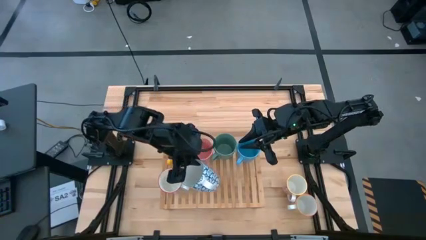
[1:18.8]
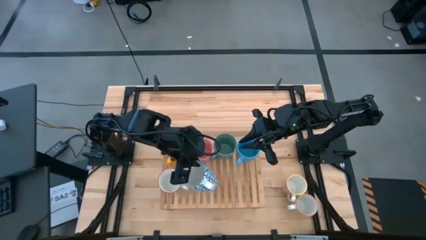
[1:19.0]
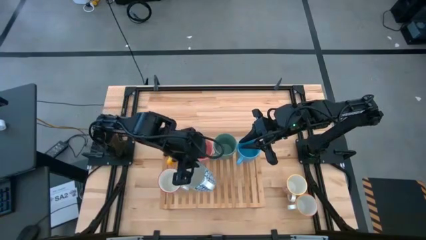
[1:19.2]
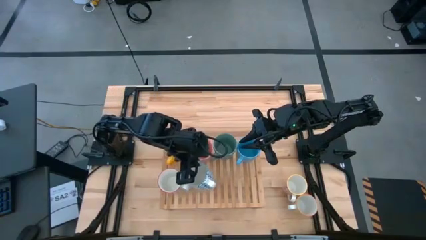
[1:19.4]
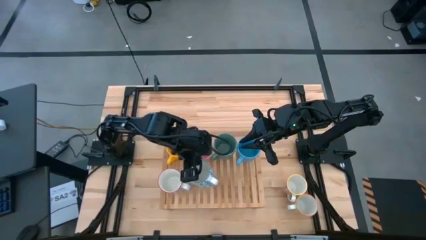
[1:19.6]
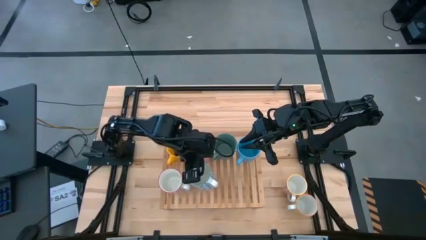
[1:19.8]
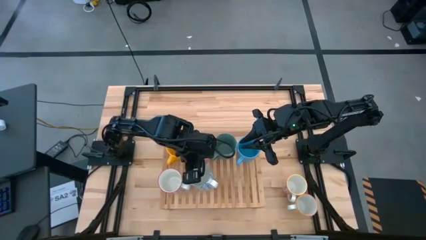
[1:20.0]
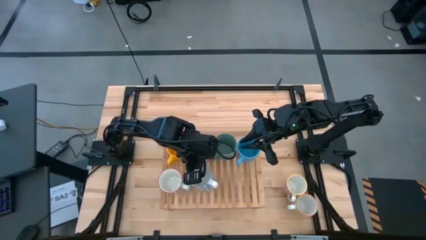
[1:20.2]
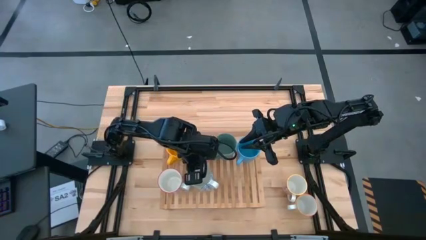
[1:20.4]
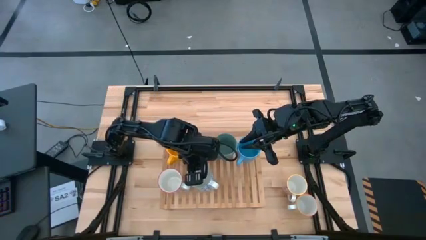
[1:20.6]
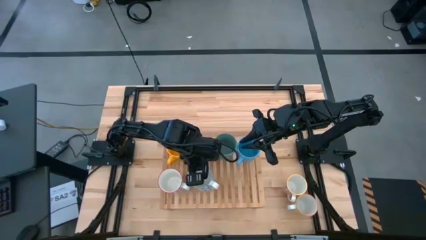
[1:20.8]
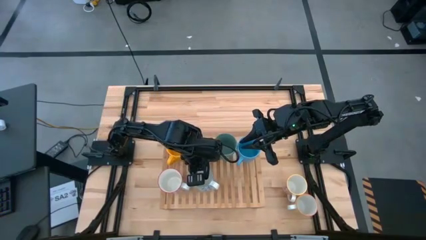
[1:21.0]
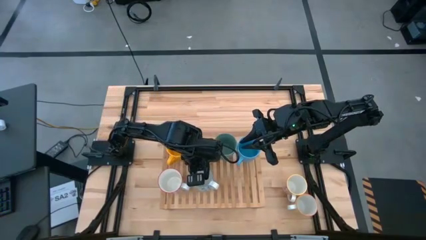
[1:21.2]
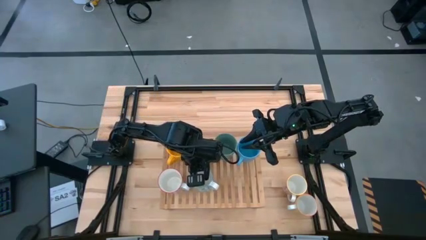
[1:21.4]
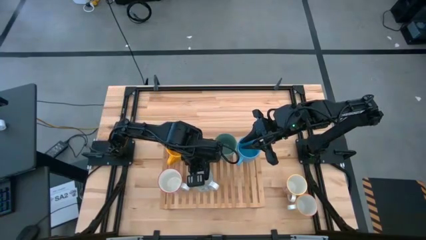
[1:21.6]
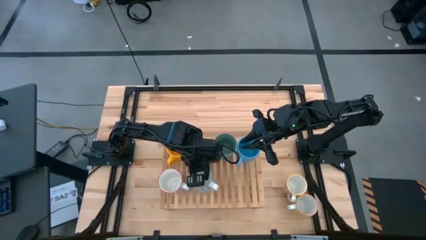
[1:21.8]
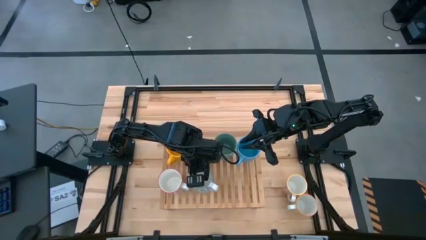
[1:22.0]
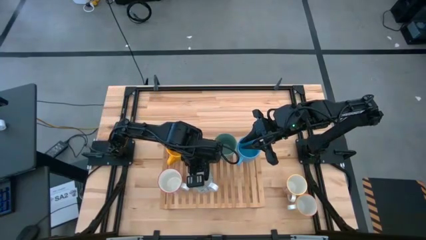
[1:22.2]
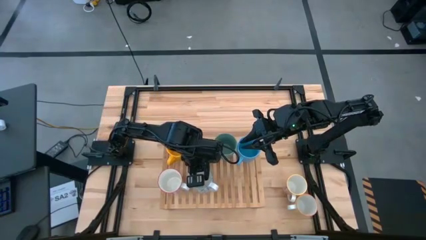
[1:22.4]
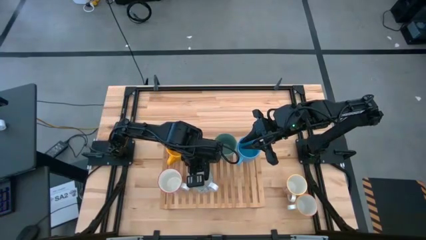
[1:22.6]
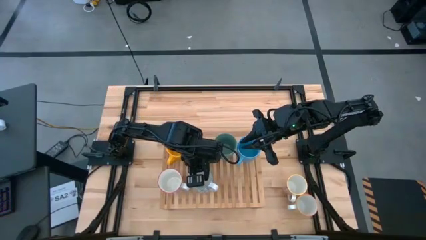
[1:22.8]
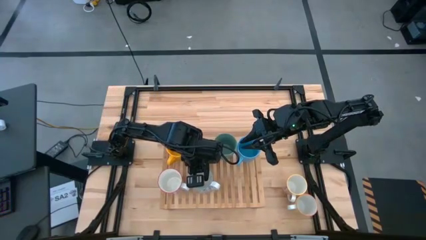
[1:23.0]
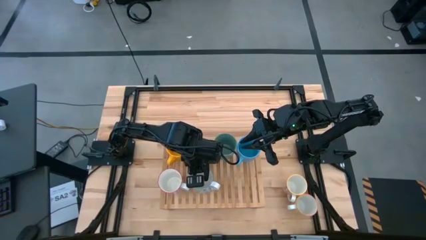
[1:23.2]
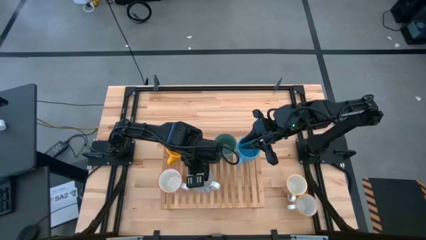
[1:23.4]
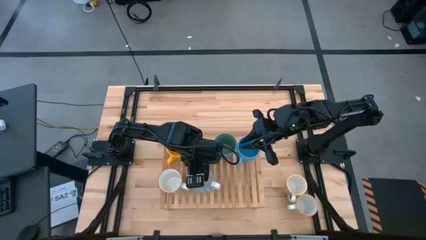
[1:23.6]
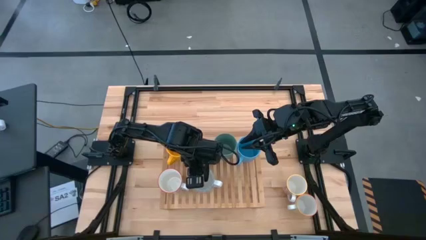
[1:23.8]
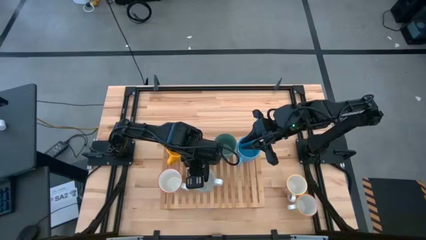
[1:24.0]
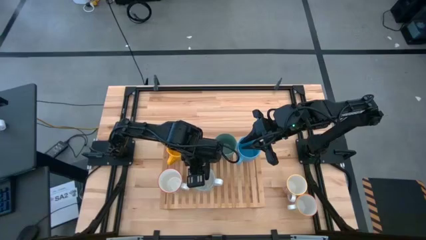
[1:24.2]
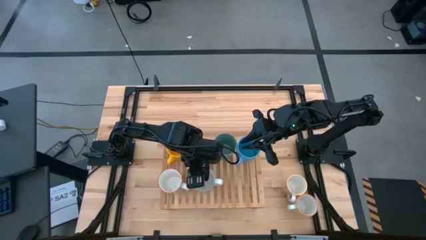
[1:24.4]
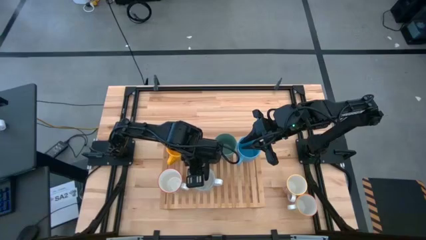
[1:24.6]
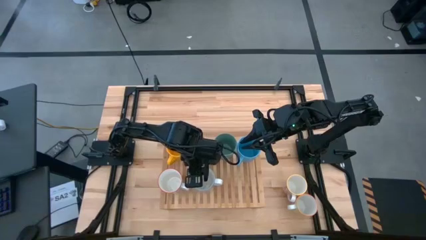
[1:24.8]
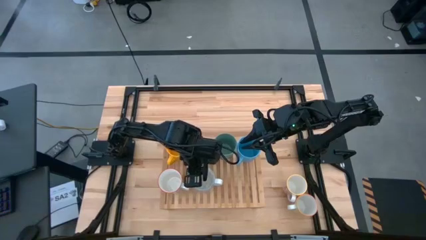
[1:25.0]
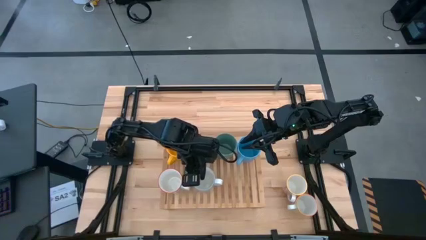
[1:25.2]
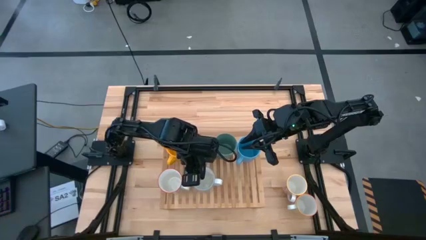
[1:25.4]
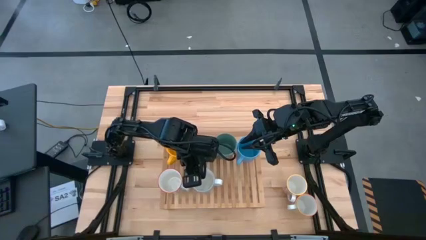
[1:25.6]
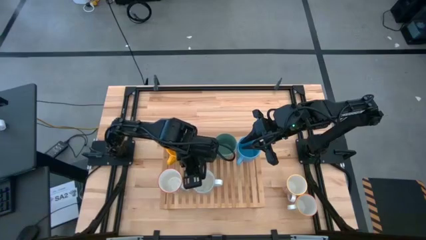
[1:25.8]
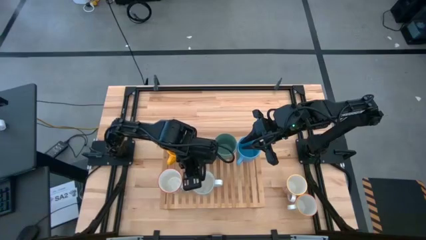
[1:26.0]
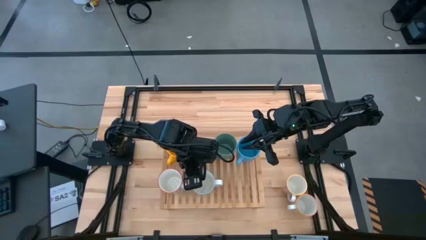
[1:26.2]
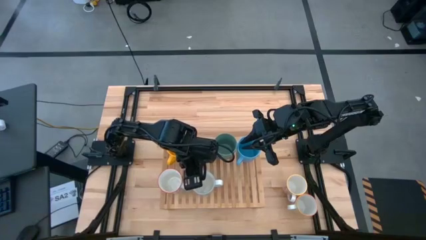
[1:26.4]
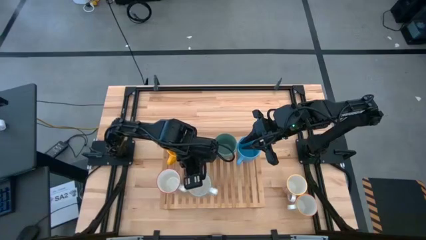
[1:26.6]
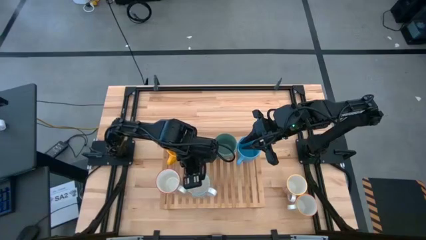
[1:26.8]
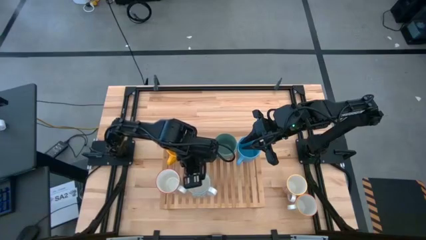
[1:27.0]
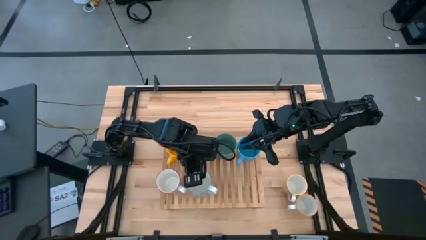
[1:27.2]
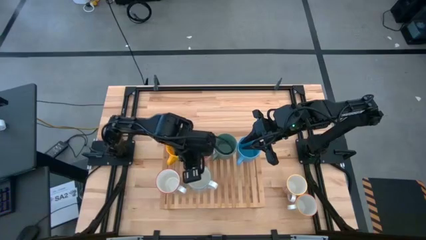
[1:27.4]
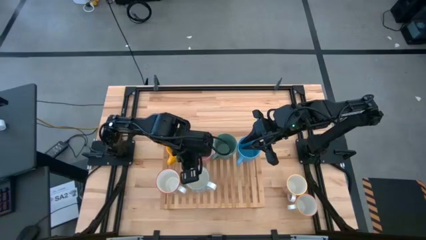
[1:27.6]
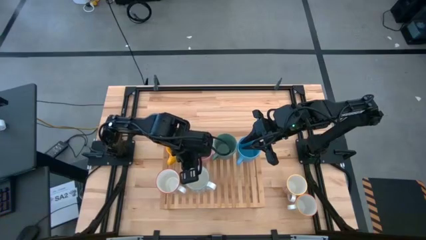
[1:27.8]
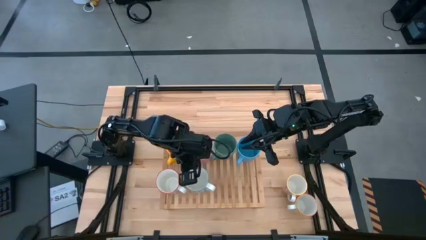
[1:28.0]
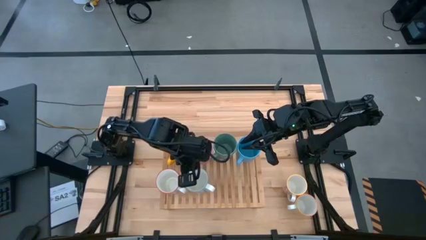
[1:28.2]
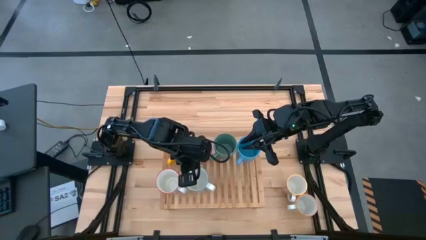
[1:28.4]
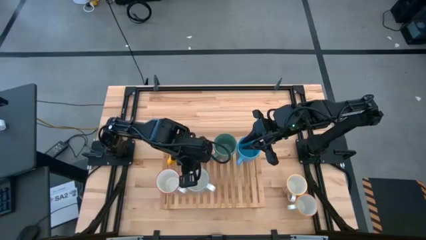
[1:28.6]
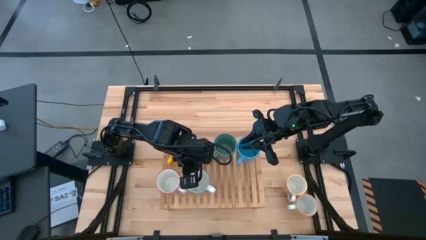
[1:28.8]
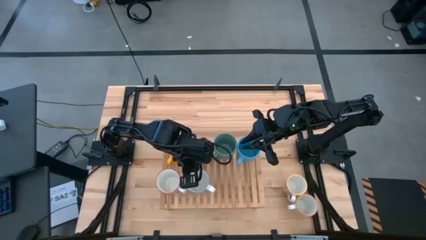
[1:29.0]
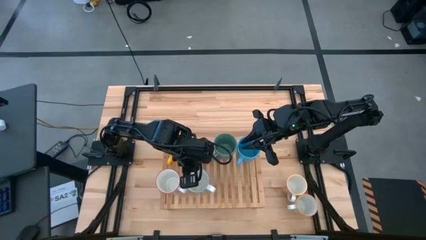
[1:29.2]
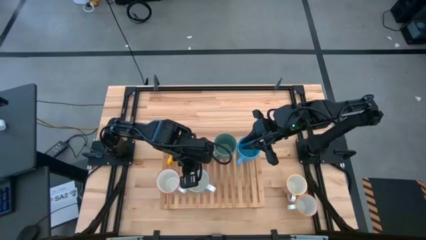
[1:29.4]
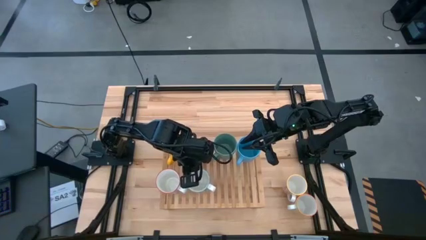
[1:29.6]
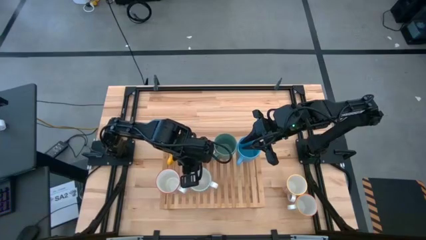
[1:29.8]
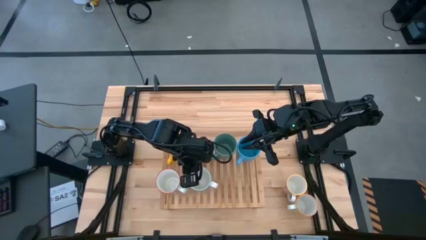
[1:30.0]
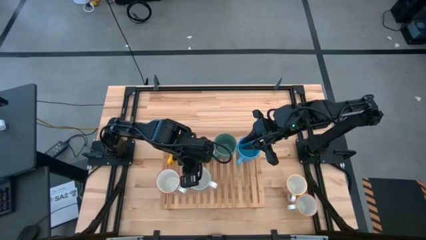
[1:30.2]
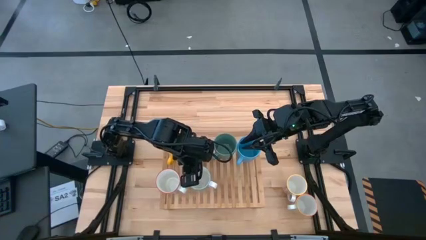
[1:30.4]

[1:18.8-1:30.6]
Task: Place coffee mugs
Put the blue patterned mug on the shelf
